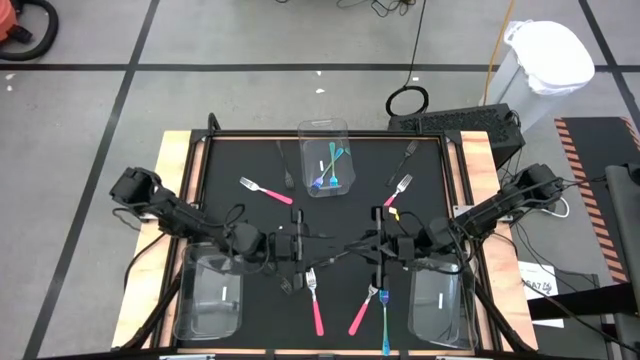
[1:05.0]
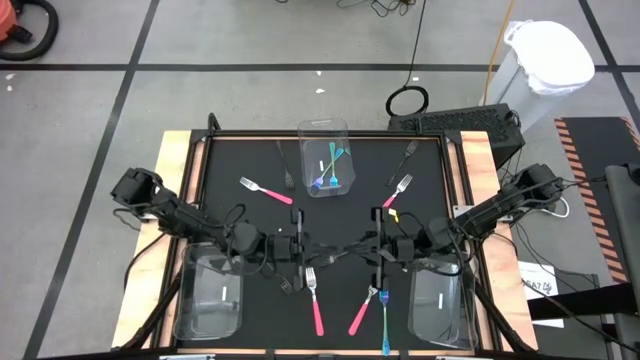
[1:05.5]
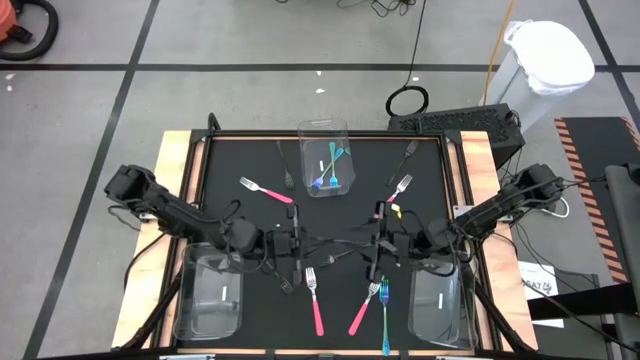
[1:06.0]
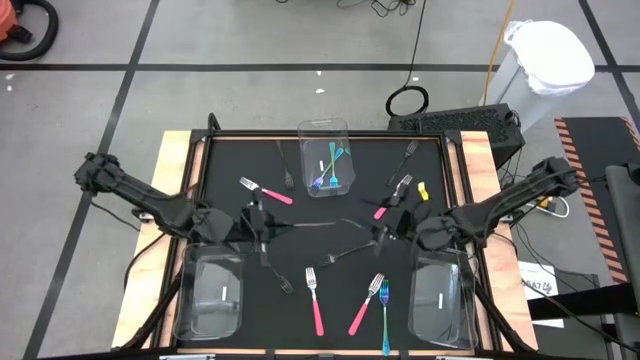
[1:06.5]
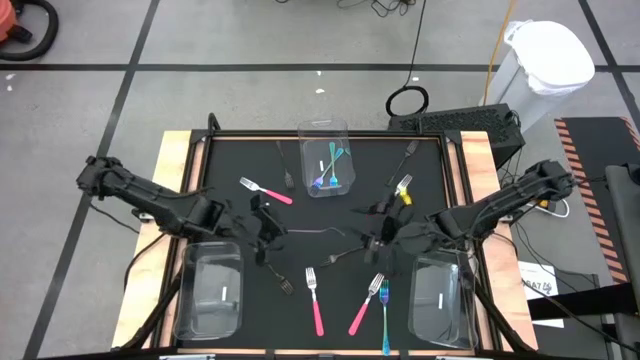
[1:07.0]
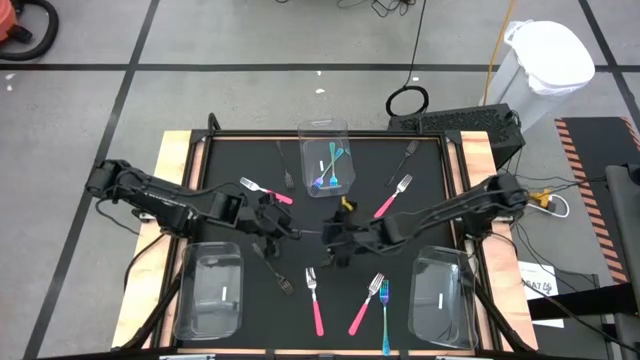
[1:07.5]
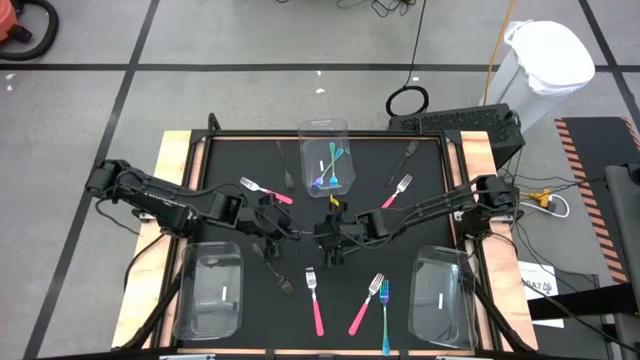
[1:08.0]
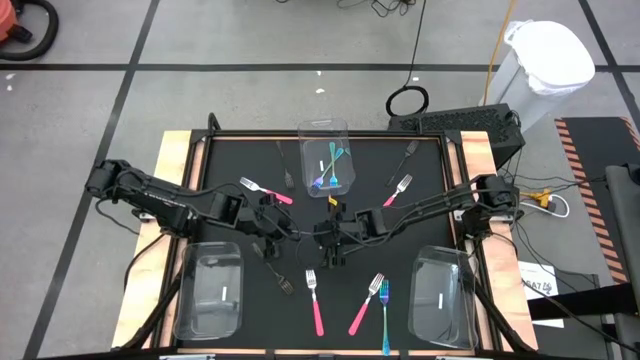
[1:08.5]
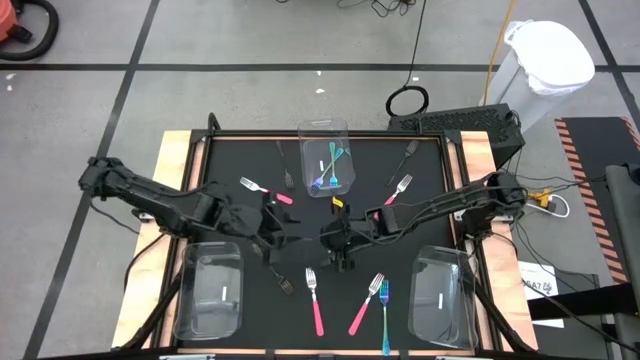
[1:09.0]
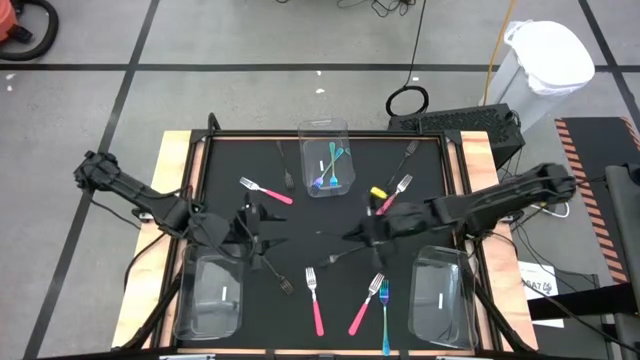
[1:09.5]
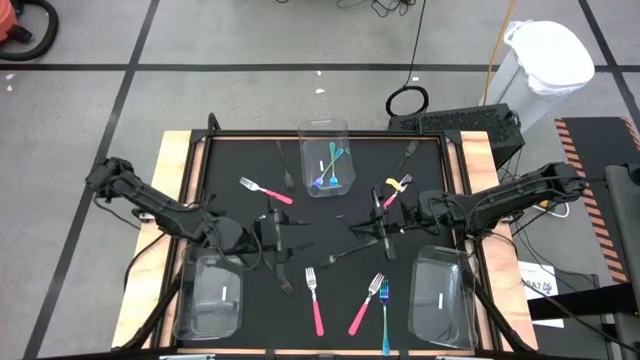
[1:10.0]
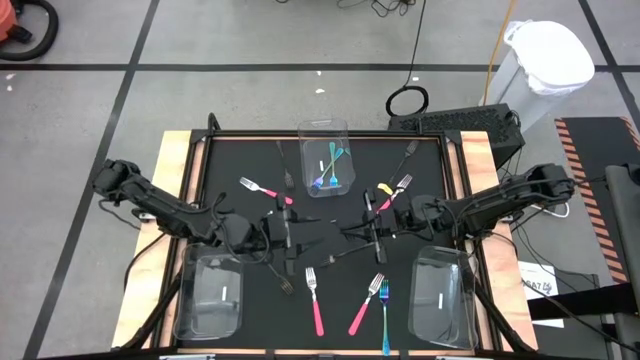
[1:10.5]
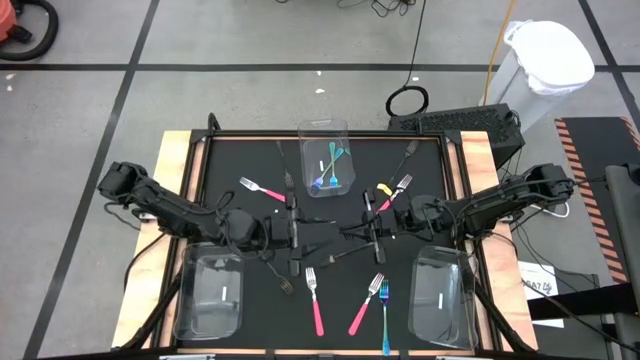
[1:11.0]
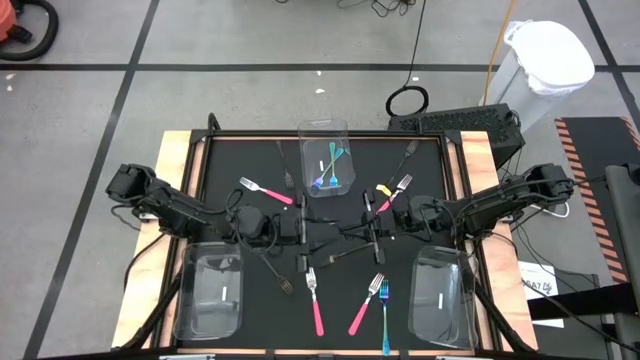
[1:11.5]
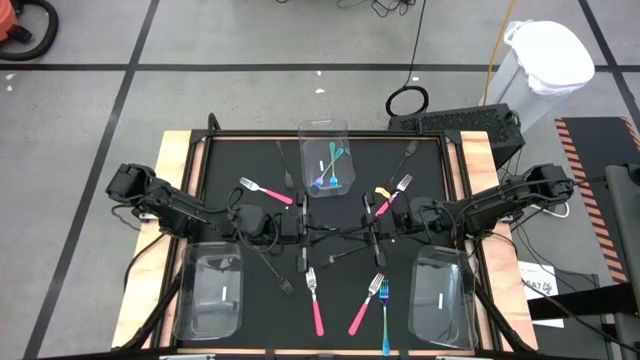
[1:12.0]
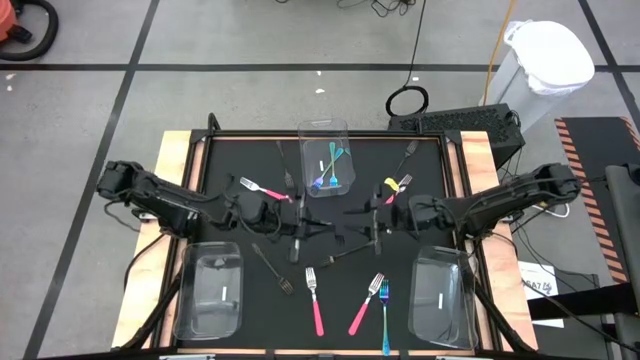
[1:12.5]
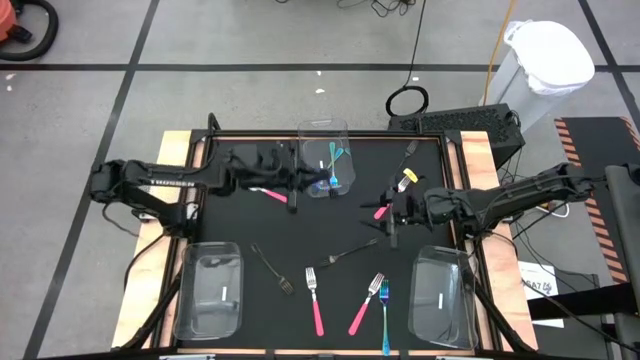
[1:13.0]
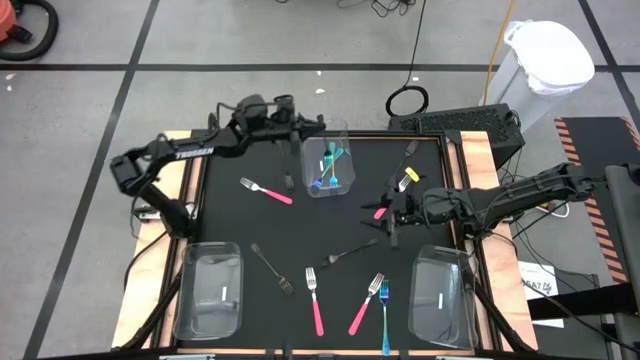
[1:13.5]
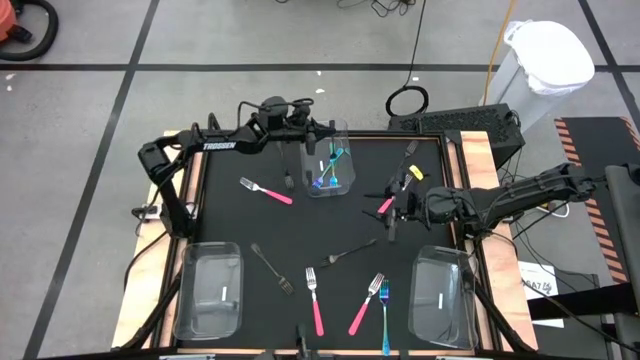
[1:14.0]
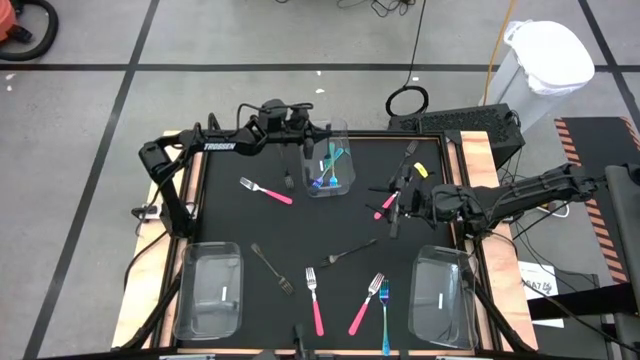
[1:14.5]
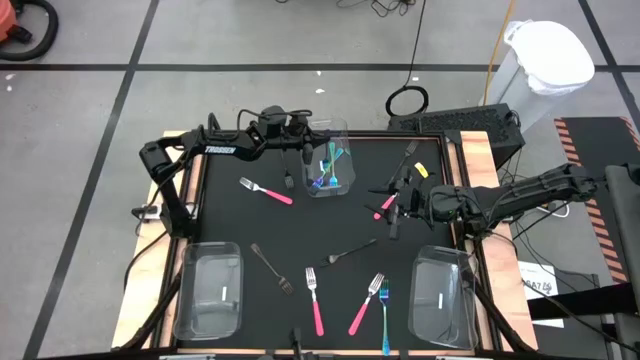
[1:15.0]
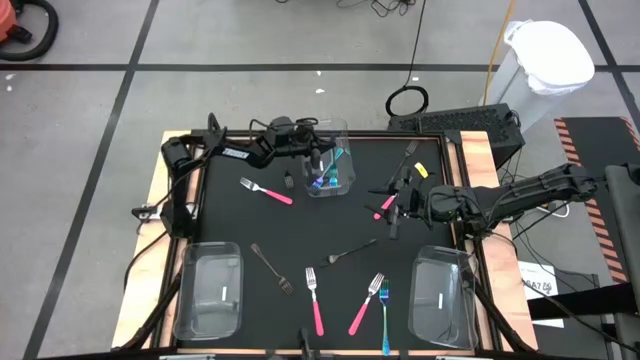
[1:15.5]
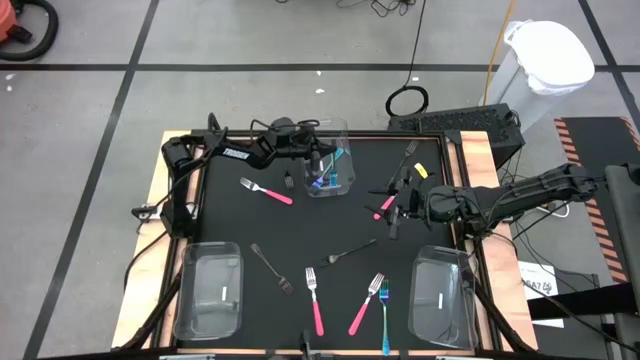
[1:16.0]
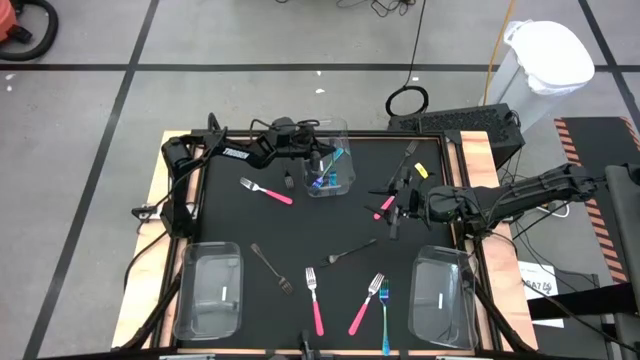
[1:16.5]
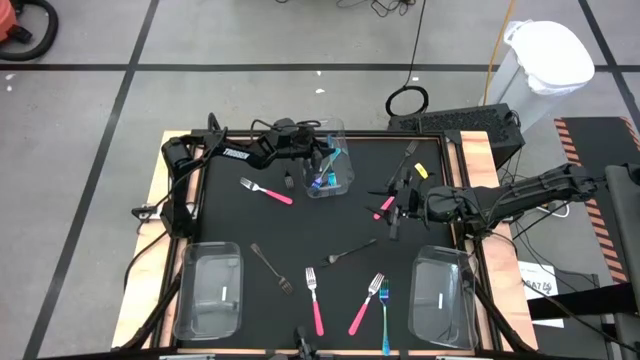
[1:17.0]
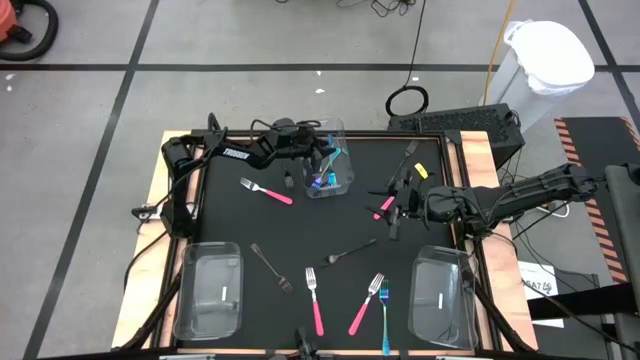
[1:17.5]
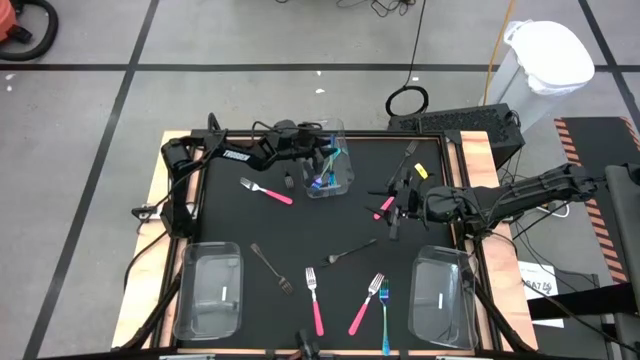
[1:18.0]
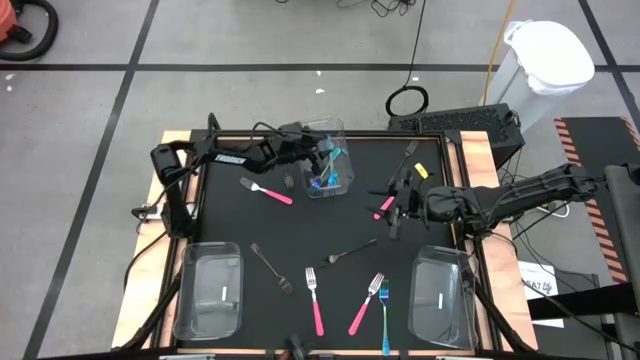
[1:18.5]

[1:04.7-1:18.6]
Task: Sort silverware by color (type)
Put the blue fork into the top transparent bin

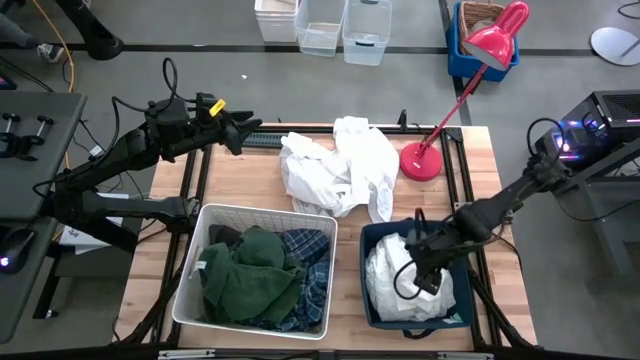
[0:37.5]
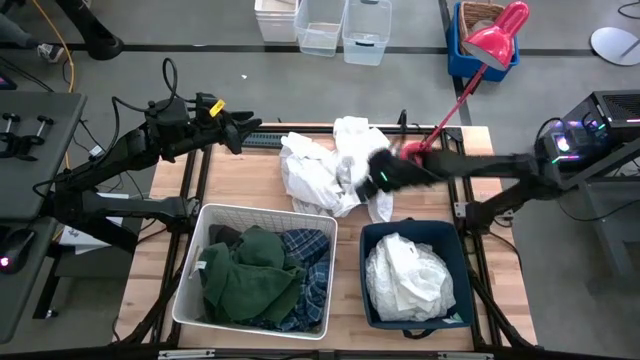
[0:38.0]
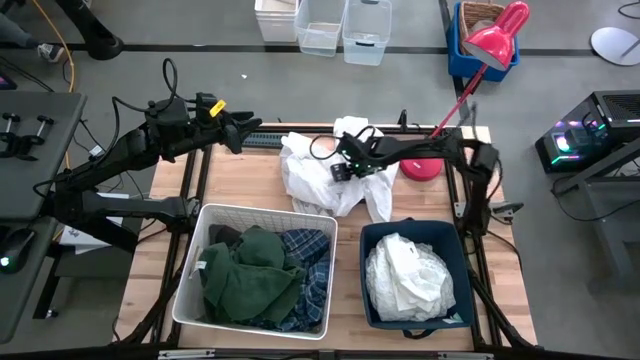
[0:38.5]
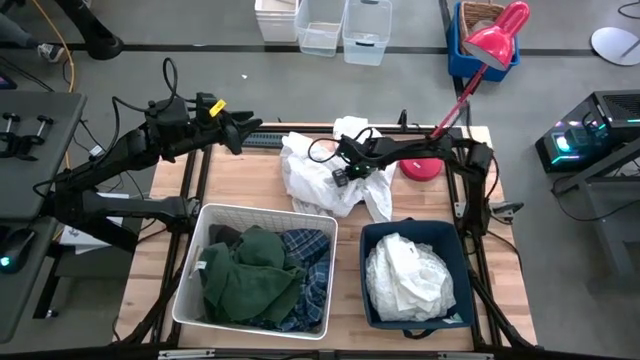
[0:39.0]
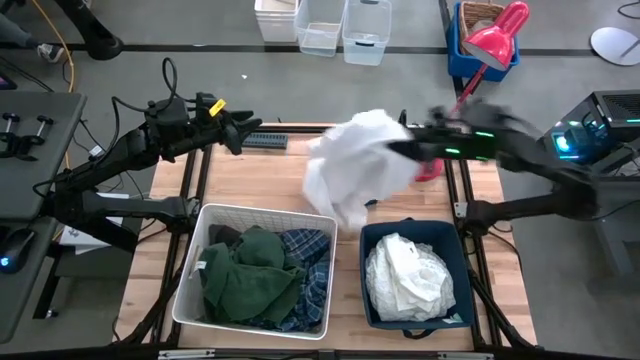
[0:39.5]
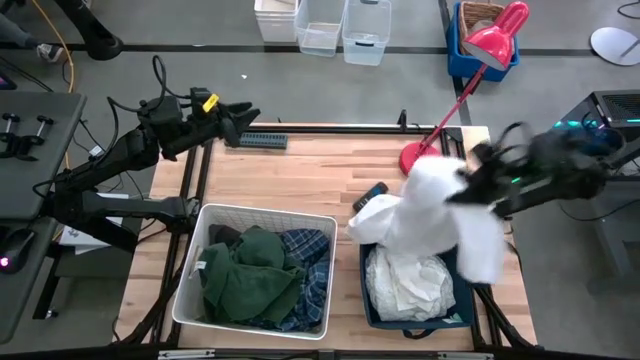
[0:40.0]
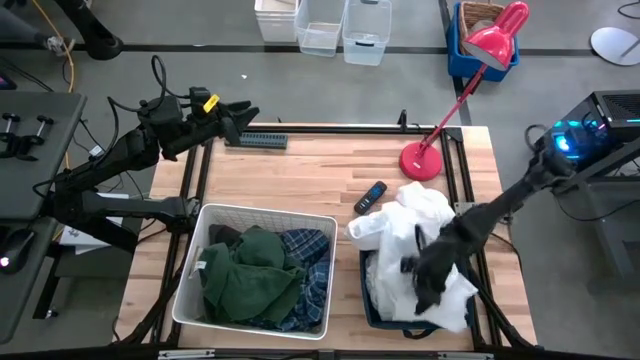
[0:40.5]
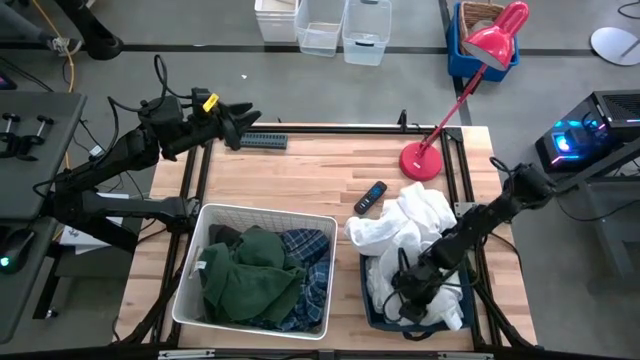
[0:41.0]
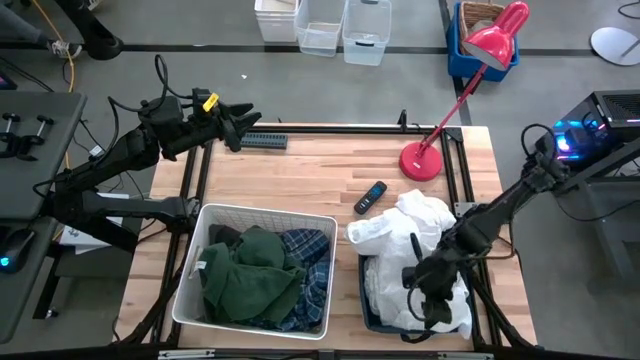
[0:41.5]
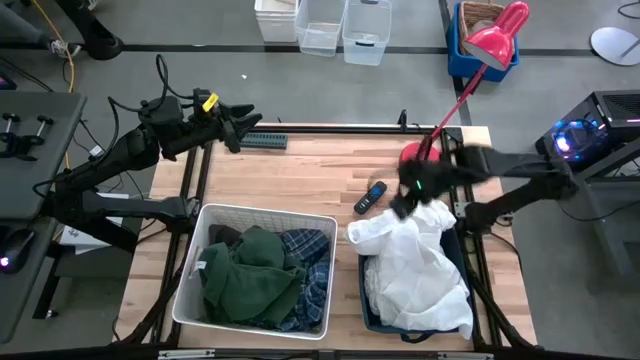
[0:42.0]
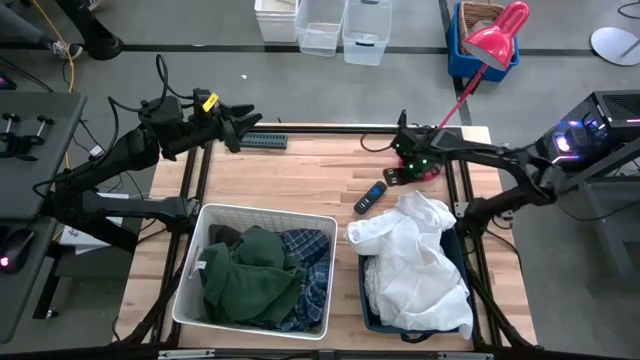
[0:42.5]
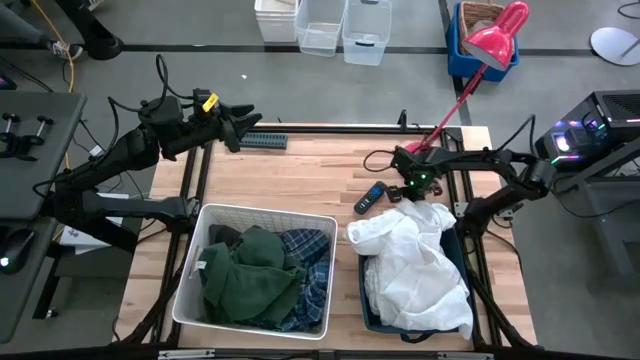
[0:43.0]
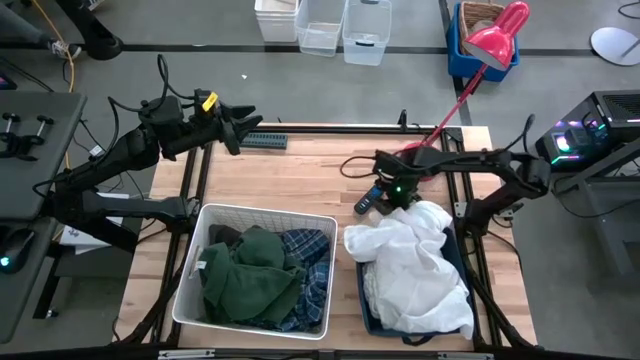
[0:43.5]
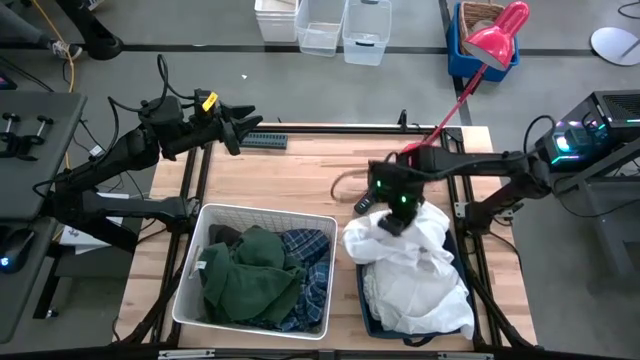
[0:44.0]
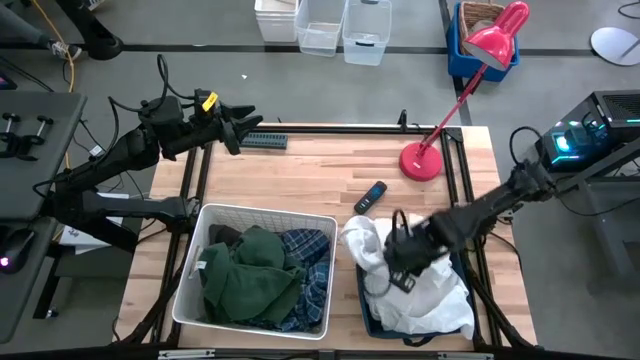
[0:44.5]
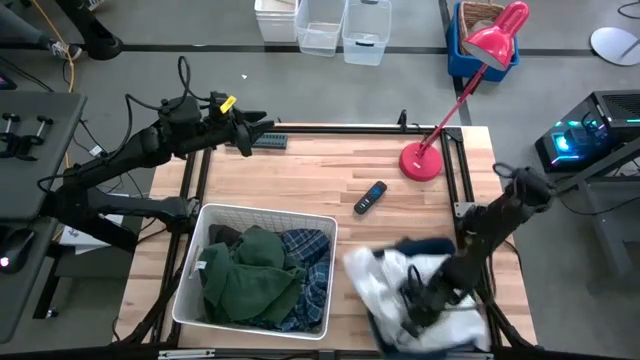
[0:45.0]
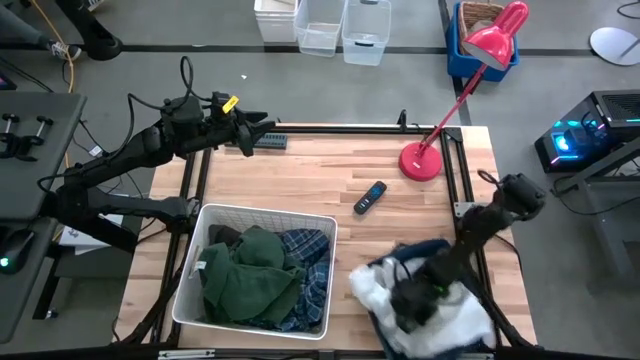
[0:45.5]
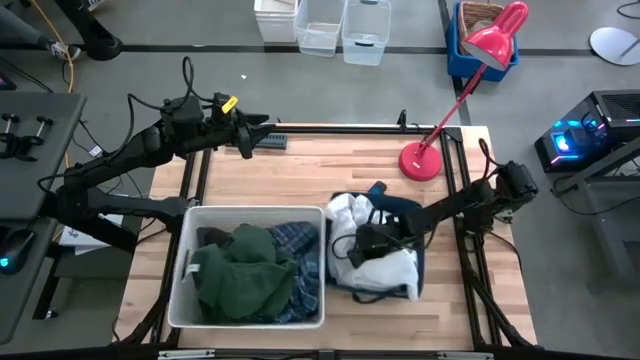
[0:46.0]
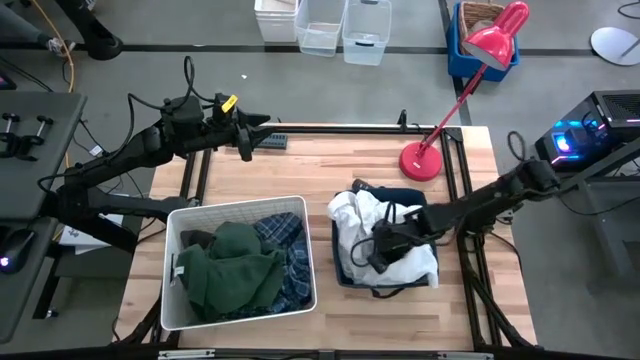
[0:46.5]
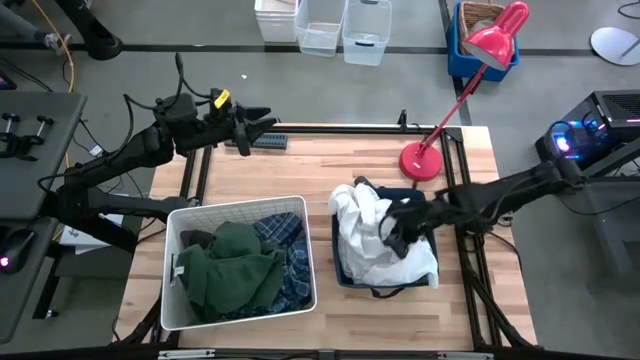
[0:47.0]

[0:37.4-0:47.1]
Task: Sort clothes
Put the white polo into the blue bin
